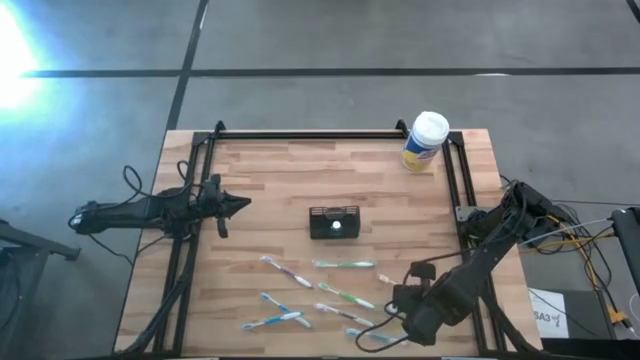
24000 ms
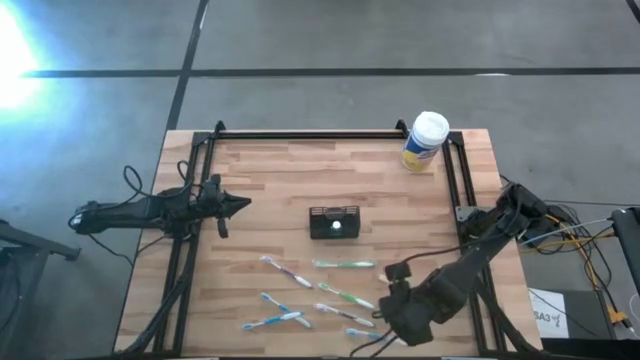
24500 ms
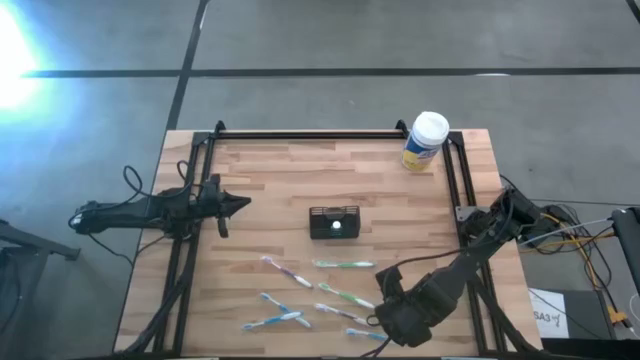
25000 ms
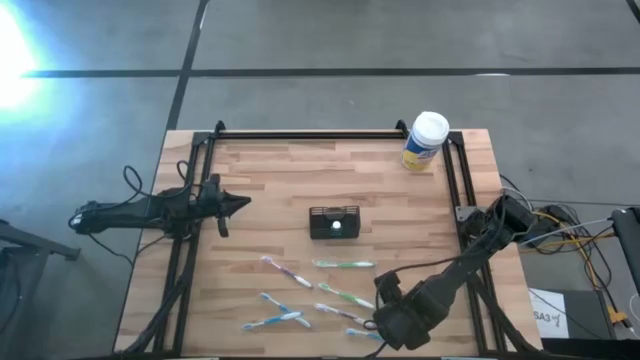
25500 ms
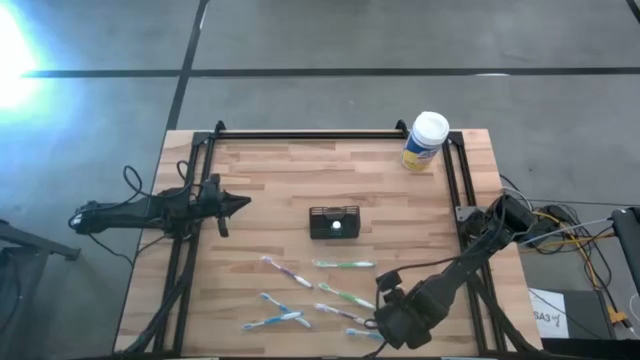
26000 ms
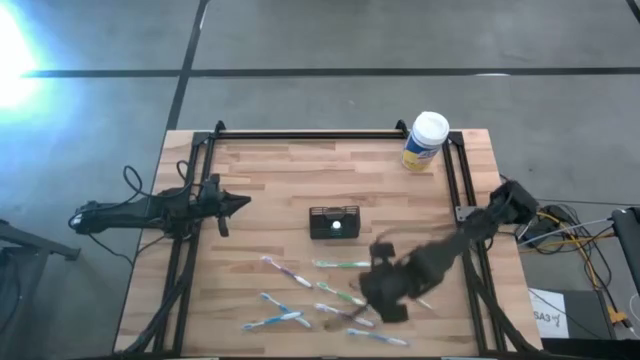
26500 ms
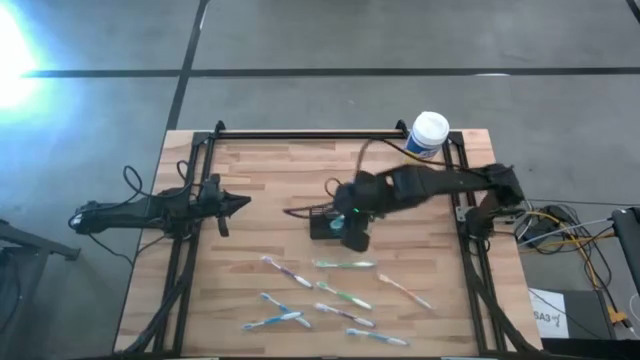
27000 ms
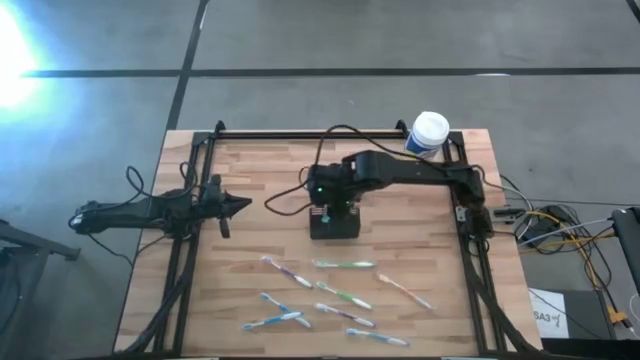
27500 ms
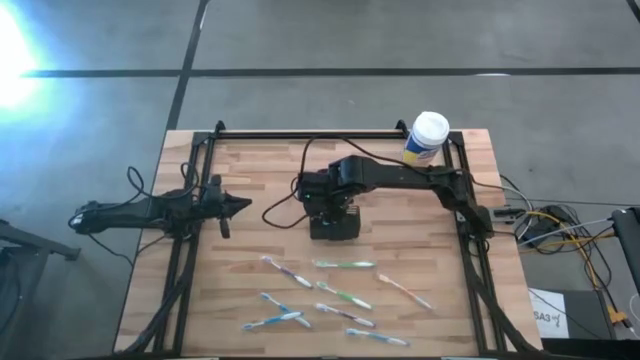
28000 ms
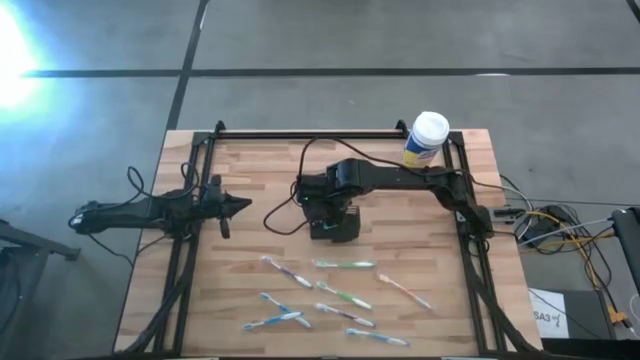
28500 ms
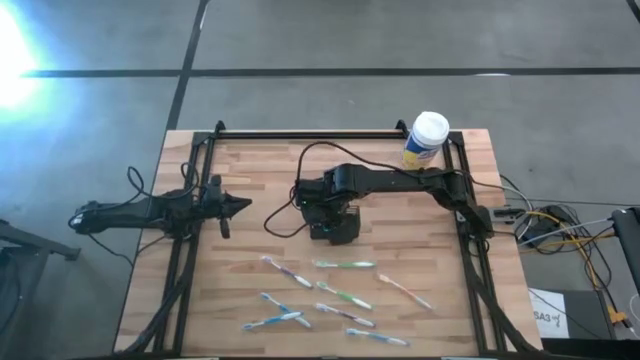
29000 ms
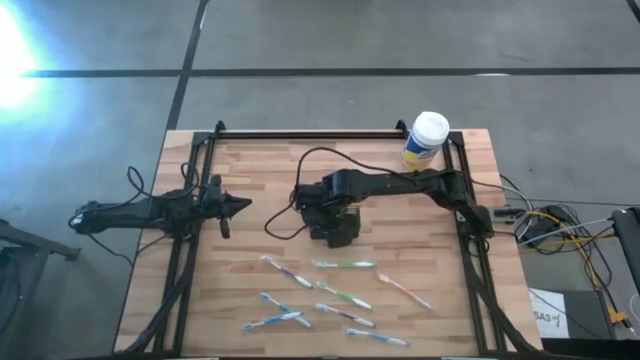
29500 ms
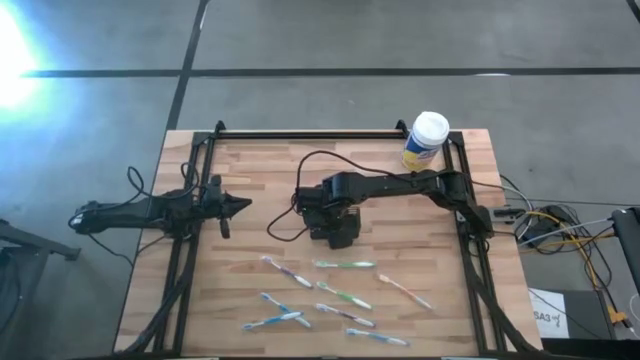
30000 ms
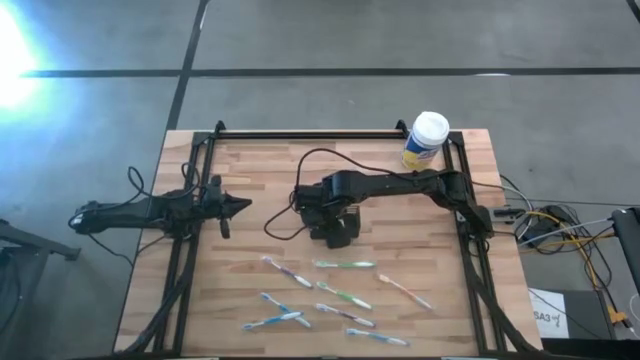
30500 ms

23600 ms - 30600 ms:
Task: Pick & Place toothbrushing station
Put the blue mouthwash into the black organizer

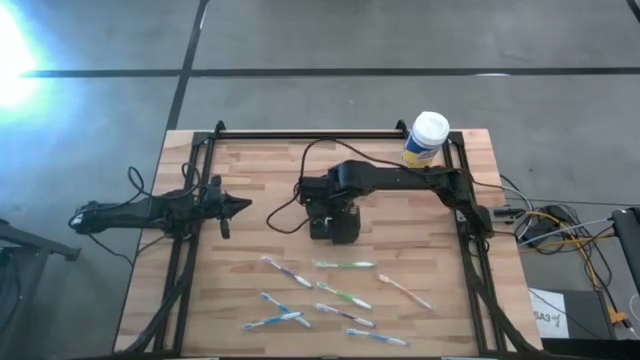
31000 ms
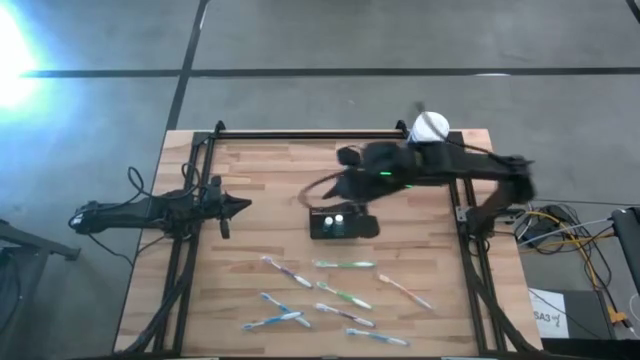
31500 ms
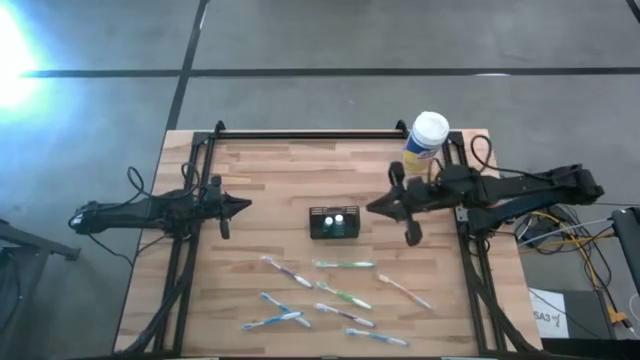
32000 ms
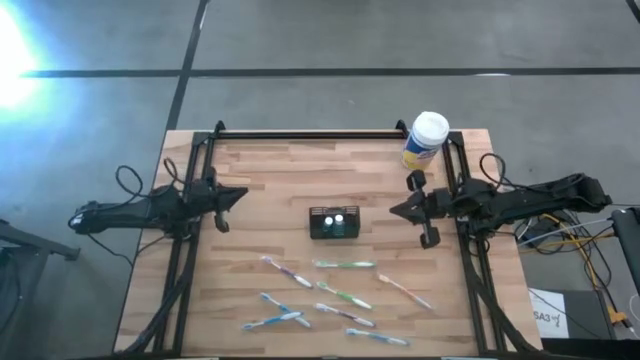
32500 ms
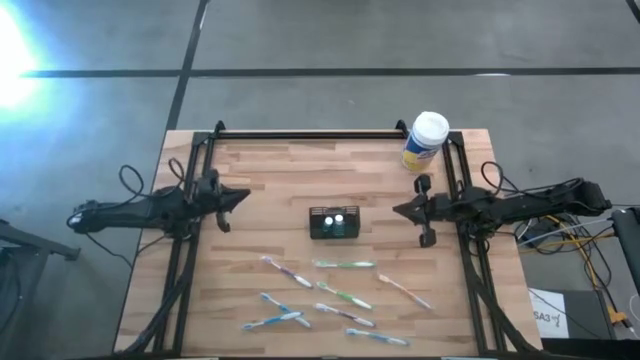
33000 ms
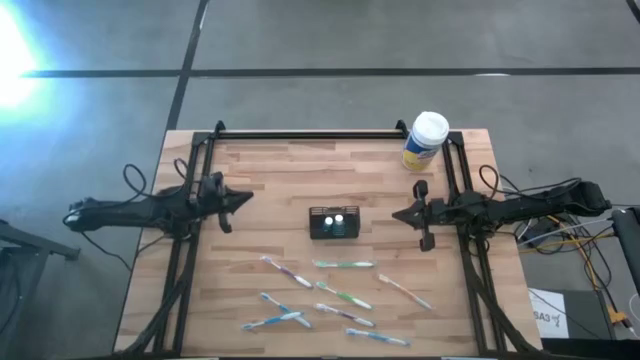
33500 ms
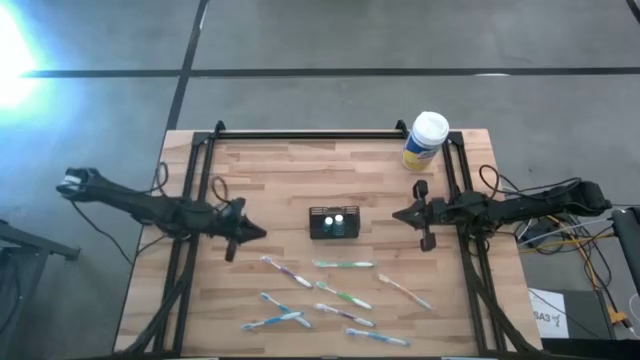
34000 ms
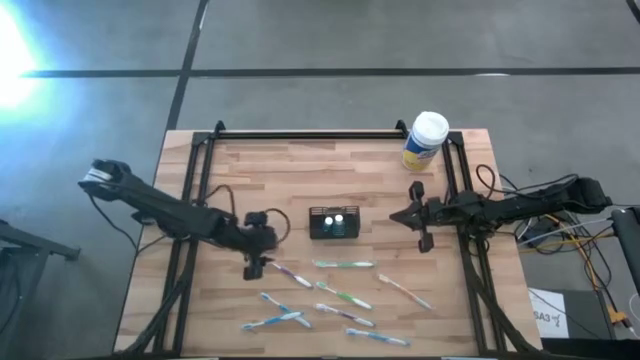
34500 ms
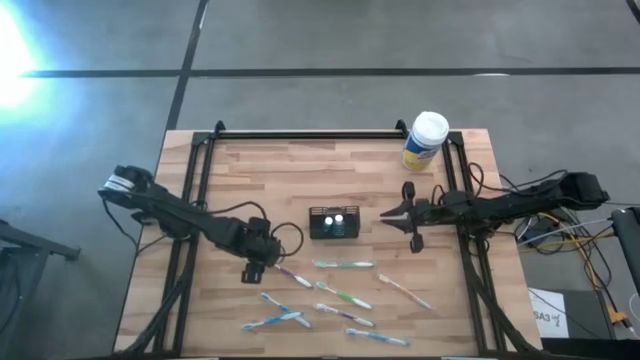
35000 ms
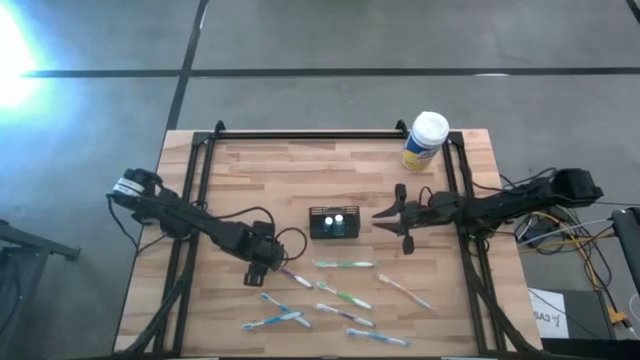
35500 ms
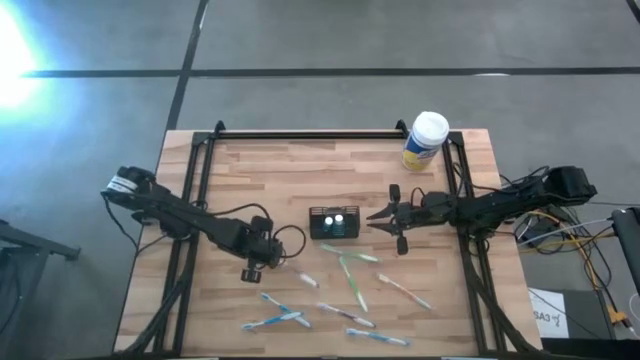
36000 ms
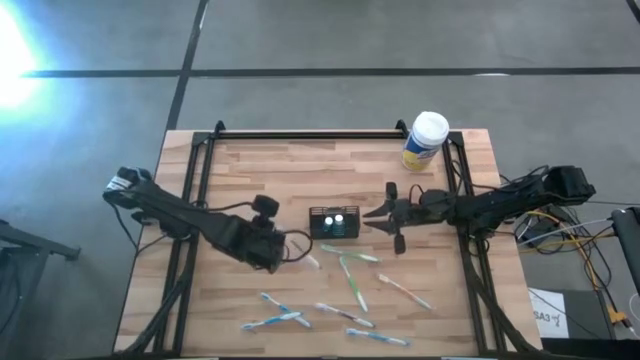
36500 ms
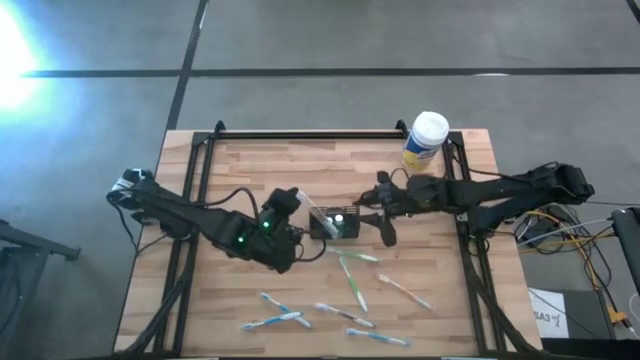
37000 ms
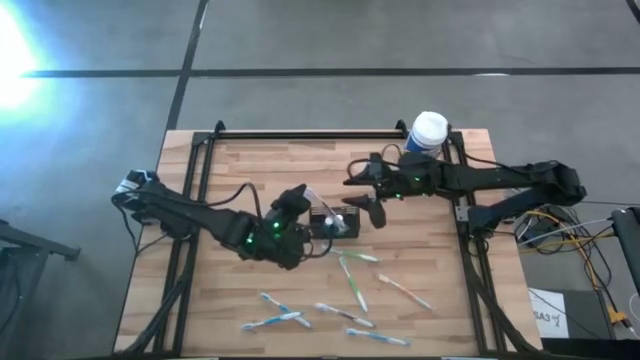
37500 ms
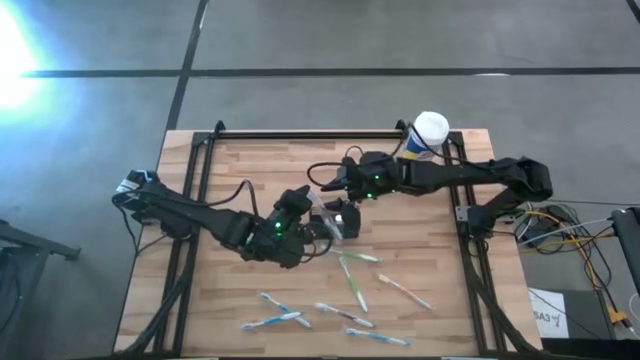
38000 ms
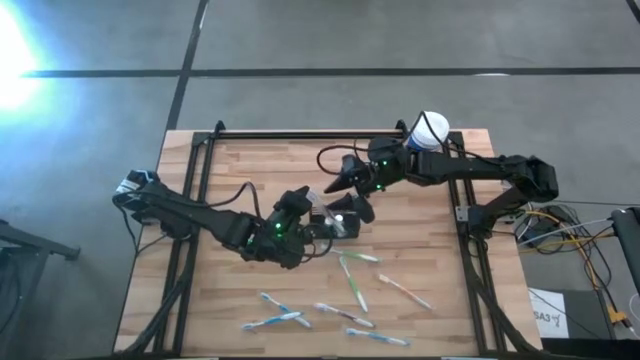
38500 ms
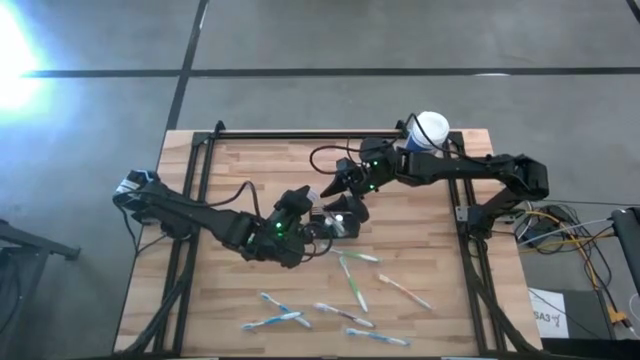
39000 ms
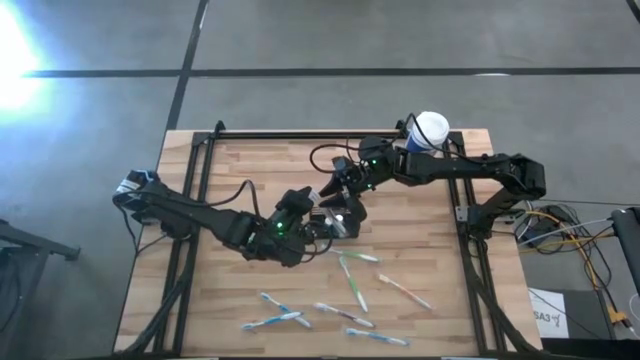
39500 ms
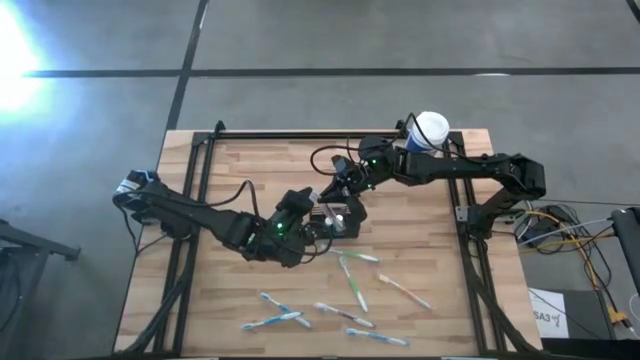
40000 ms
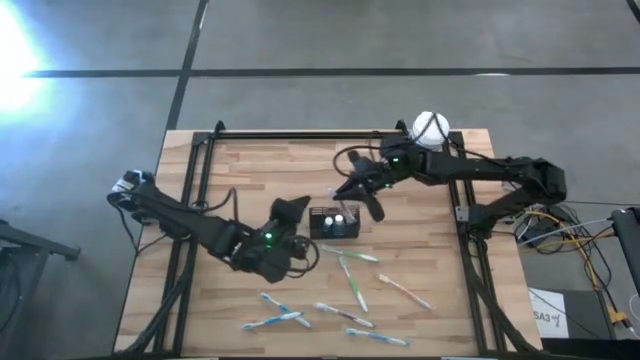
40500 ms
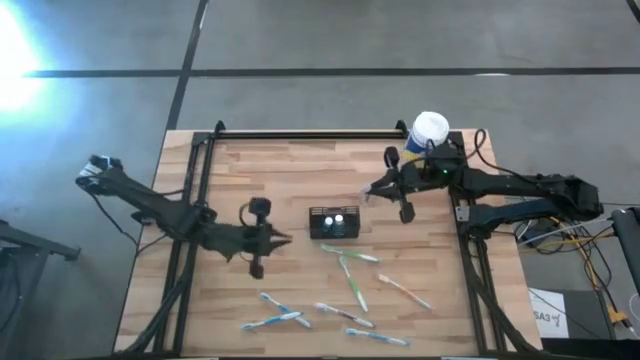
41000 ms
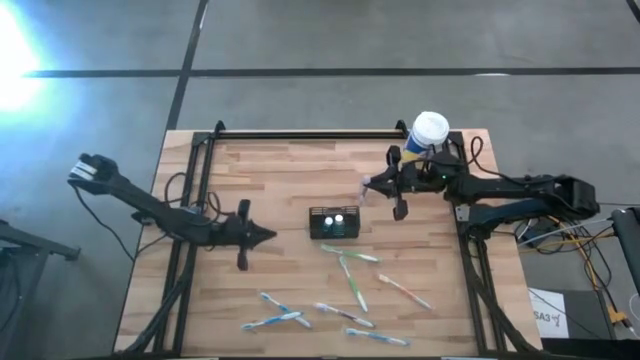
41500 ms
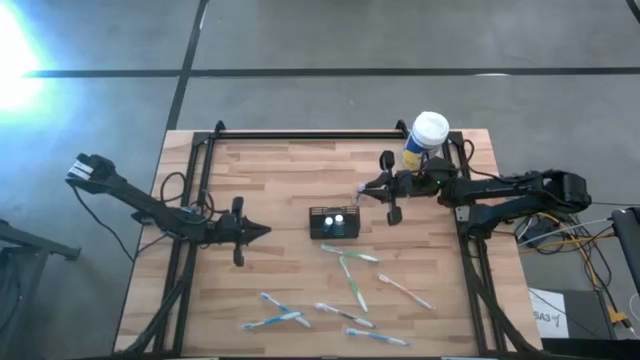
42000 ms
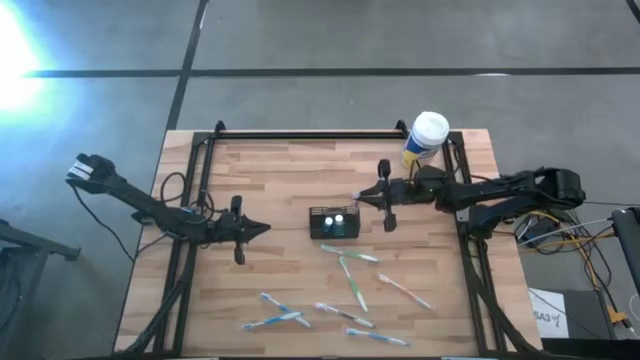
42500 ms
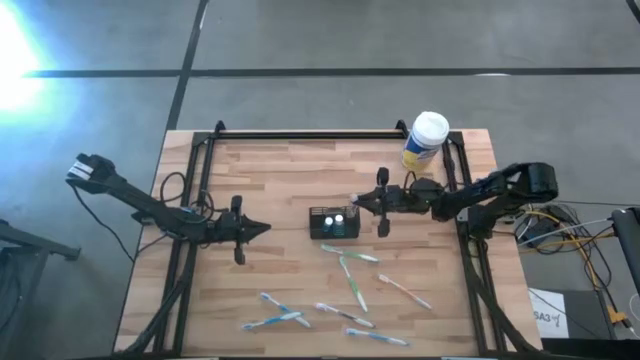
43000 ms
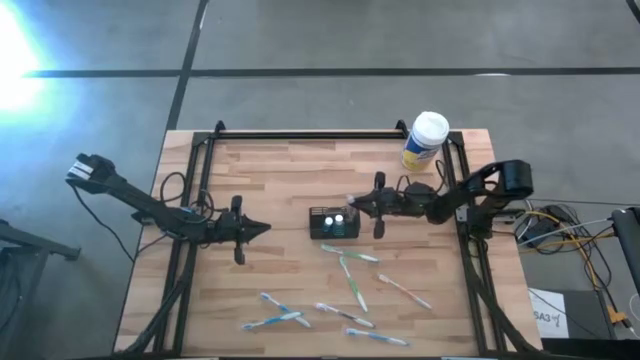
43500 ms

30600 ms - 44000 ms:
Put the top violet toothbrush into the black organizer

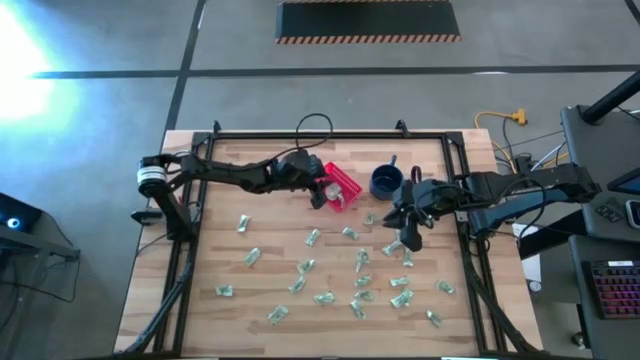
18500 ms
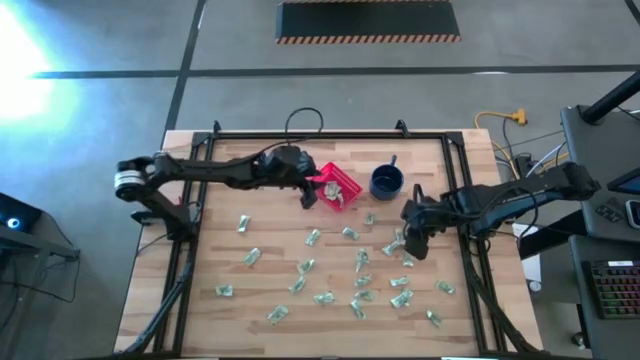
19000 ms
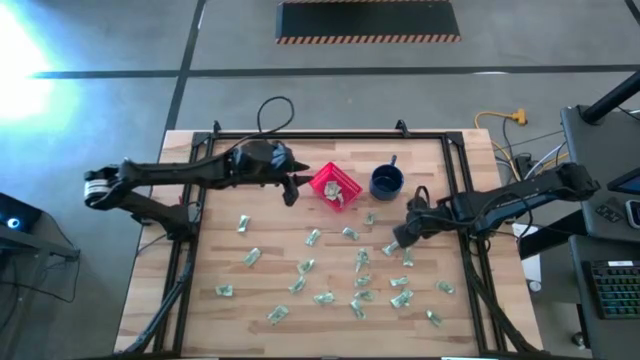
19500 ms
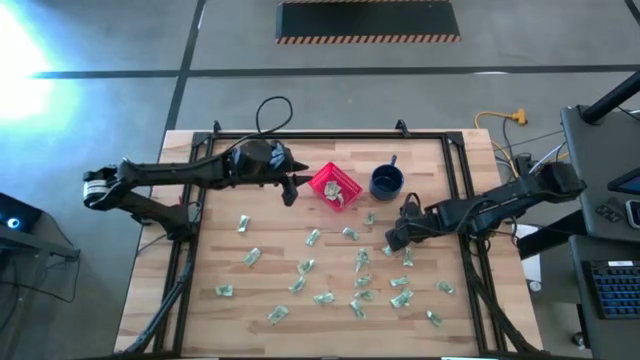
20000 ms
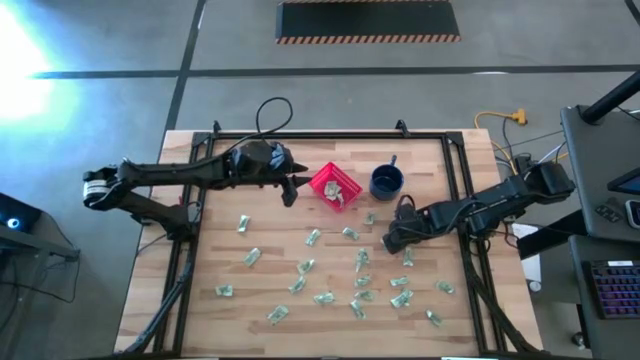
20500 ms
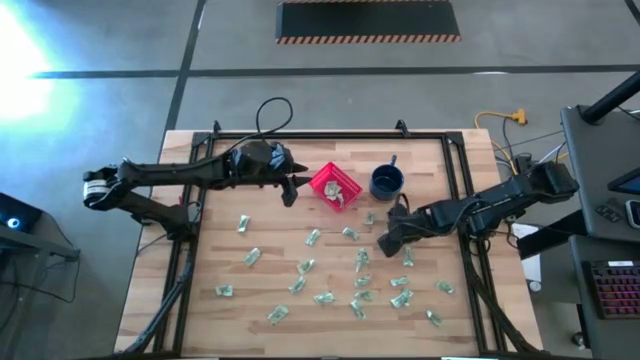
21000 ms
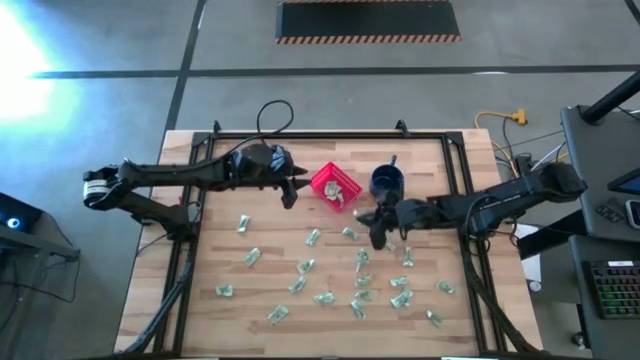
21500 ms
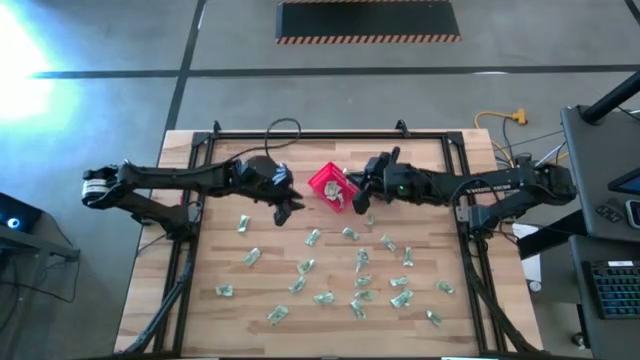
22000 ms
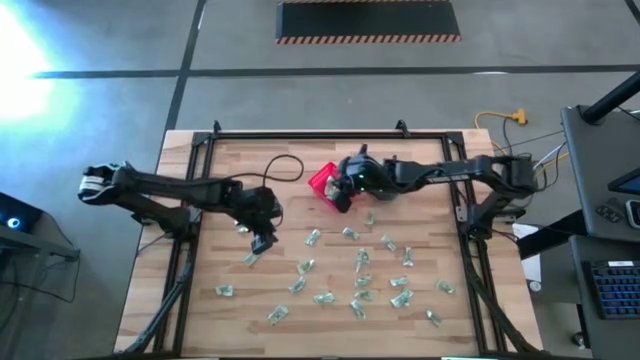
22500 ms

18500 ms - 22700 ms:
Task: Pick and place Stevia / Truvia into bins
Put the stevia packet into the red basket
